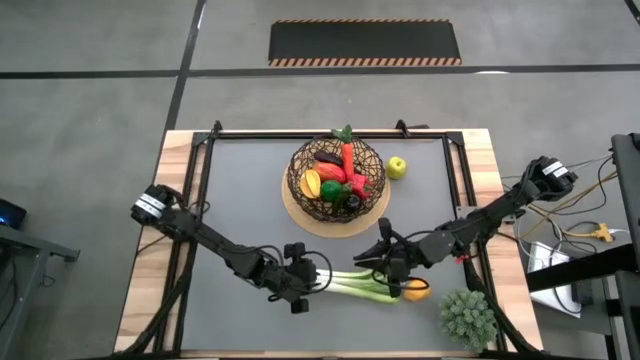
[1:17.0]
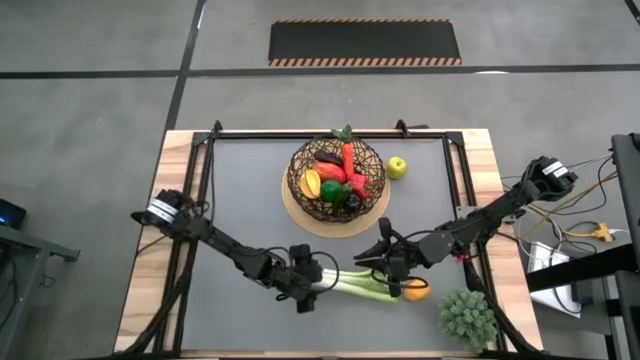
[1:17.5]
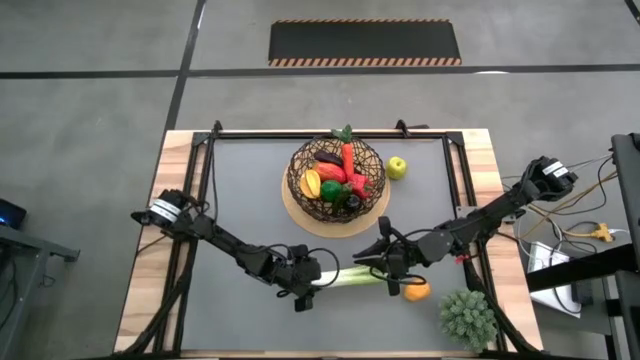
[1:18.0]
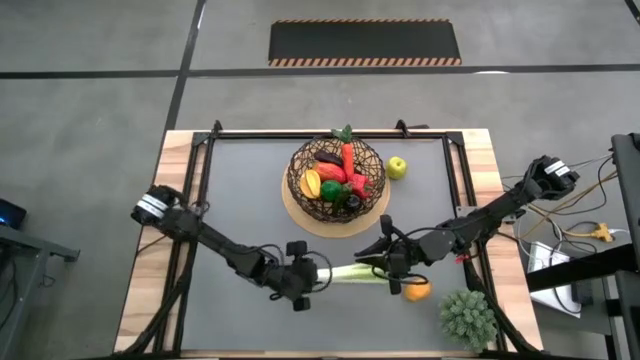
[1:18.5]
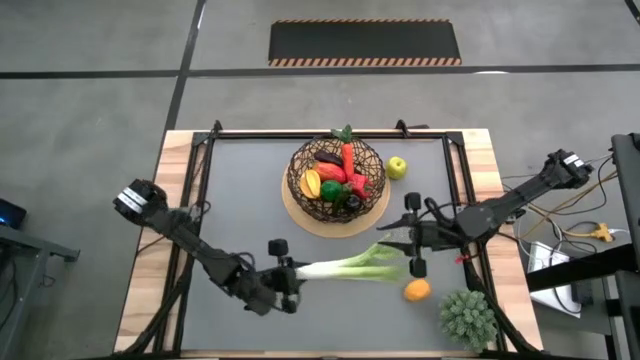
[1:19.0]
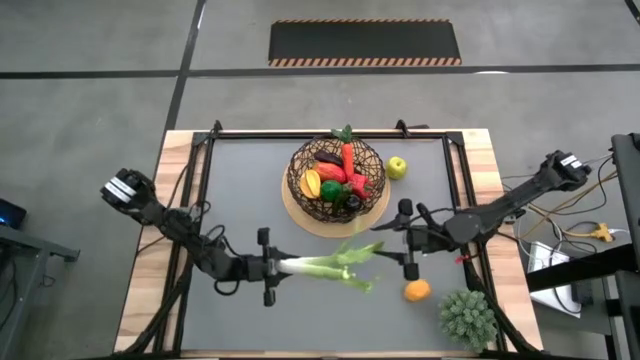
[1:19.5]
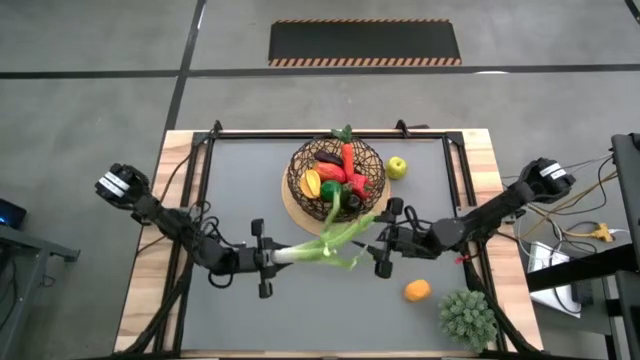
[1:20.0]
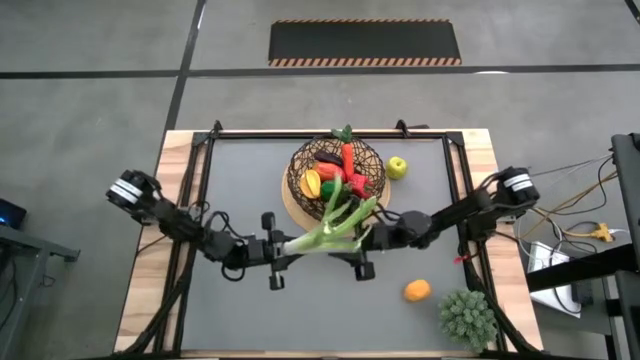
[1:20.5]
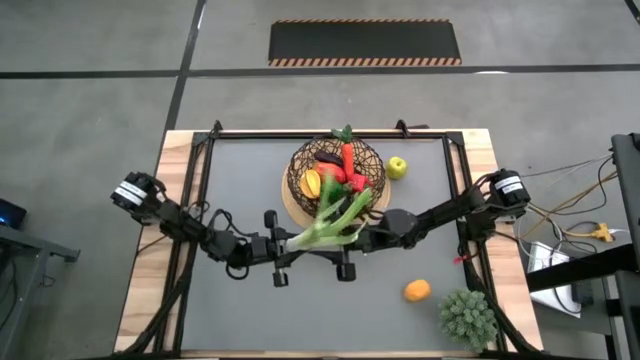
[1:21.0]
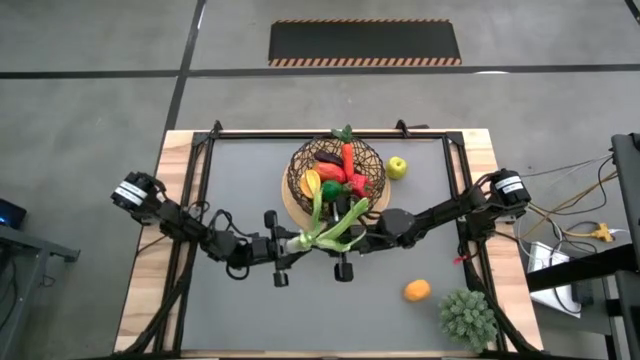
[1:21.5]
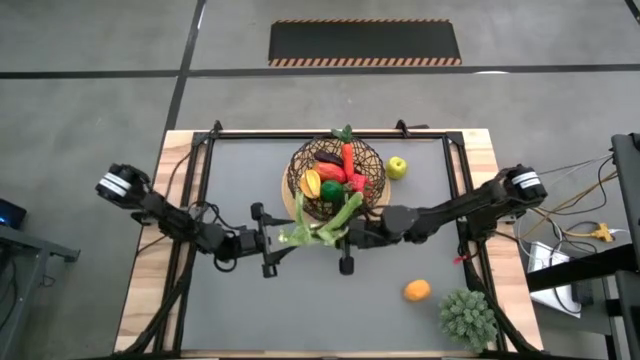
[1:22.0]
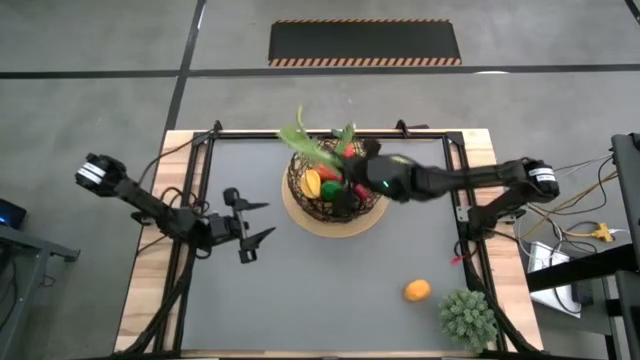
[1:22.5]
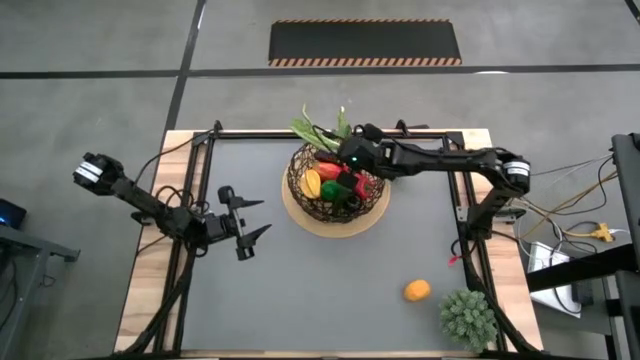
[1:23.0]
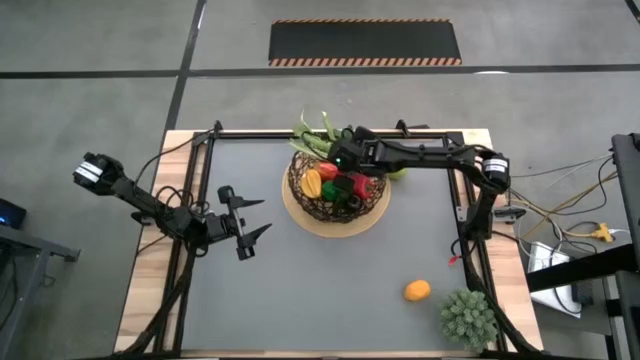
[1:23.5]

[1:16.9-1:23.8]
Task: Build produce basket
Put the celery into the basket

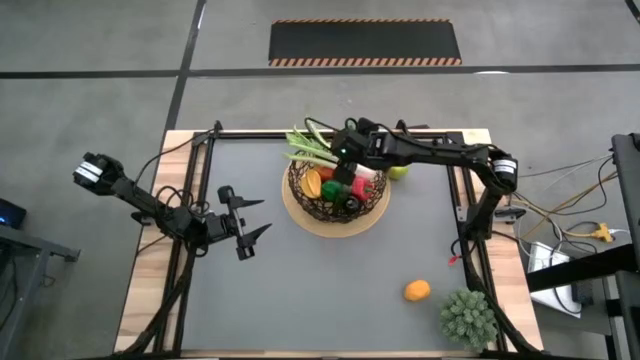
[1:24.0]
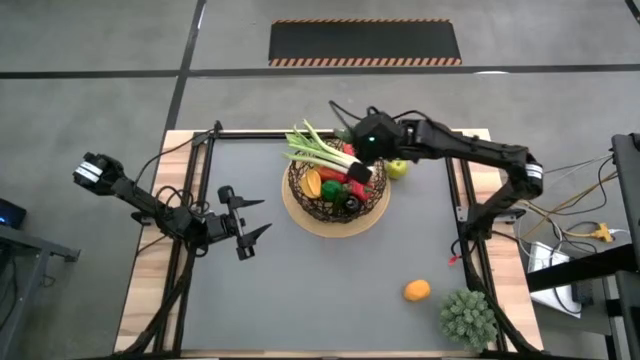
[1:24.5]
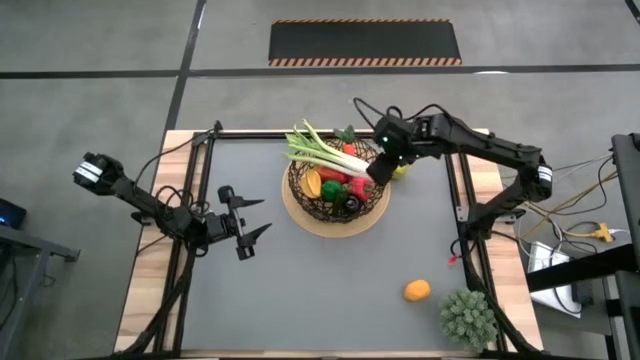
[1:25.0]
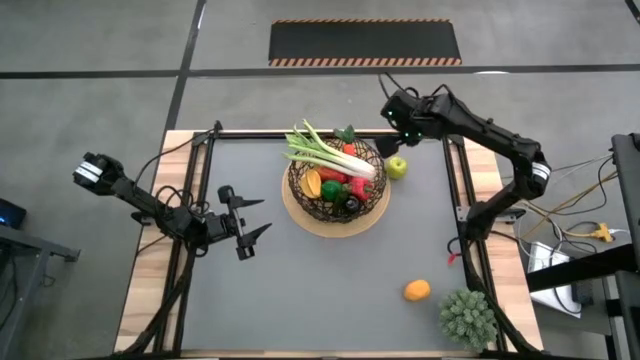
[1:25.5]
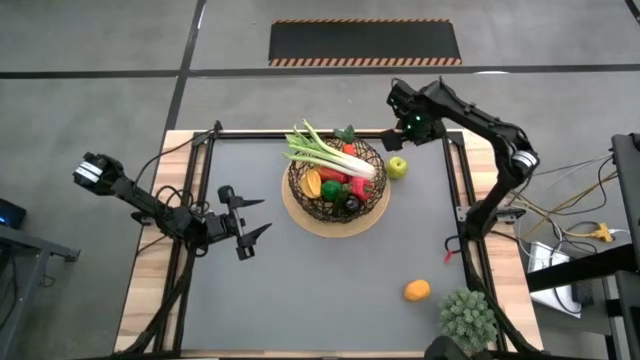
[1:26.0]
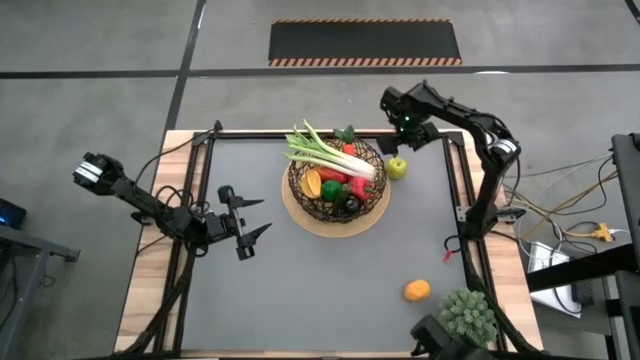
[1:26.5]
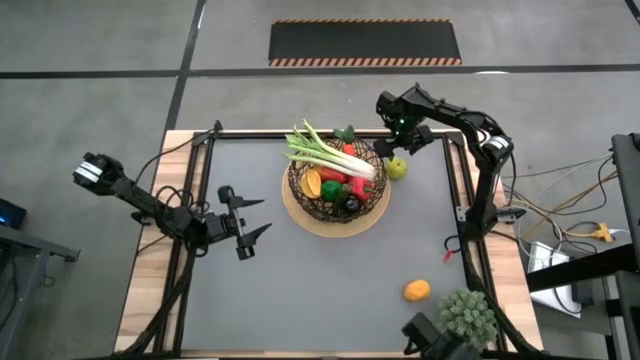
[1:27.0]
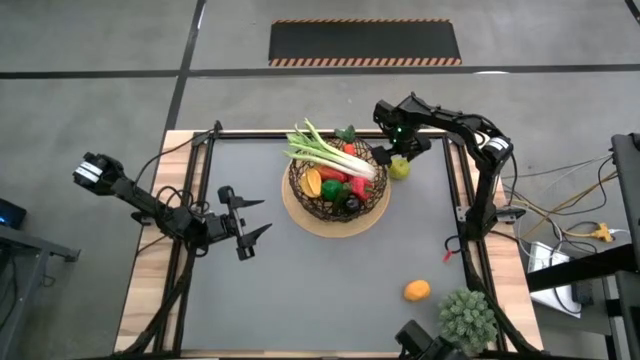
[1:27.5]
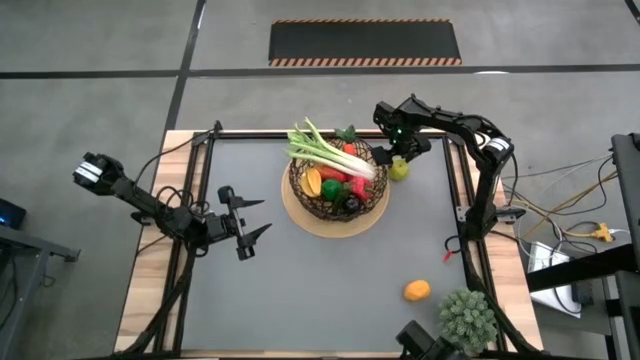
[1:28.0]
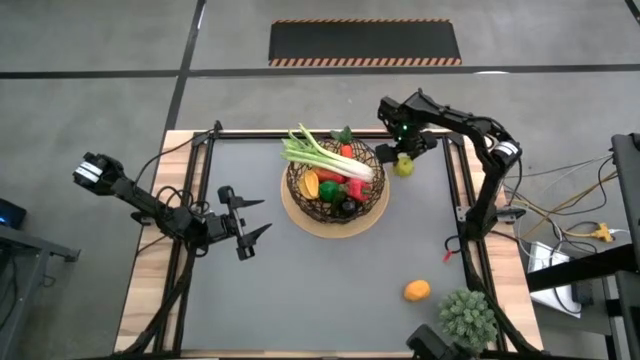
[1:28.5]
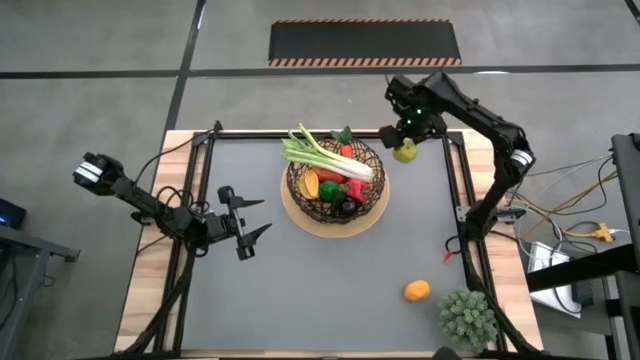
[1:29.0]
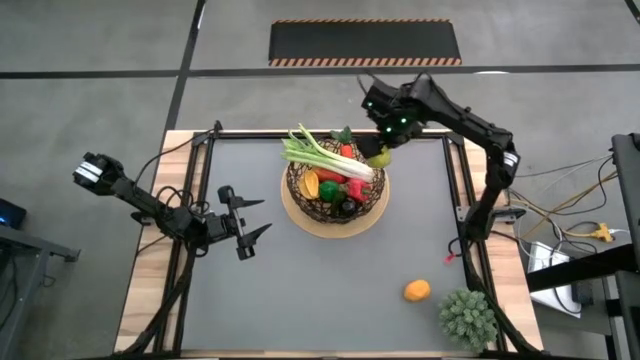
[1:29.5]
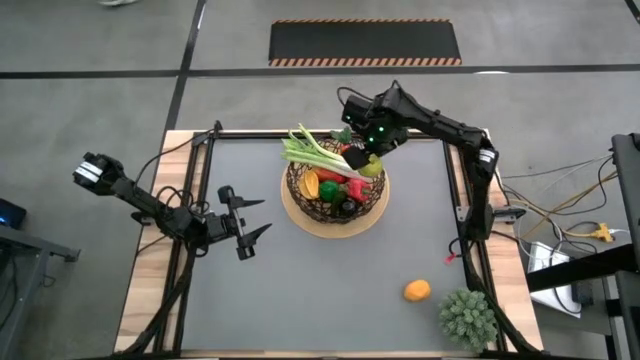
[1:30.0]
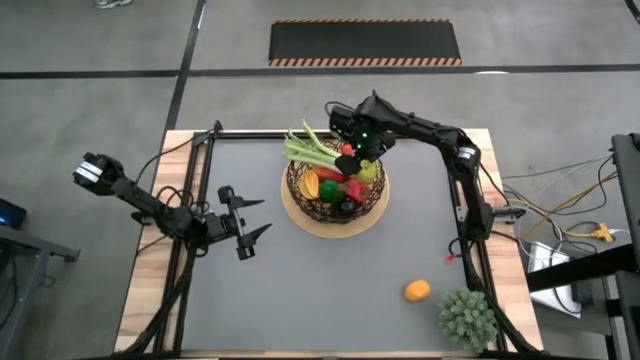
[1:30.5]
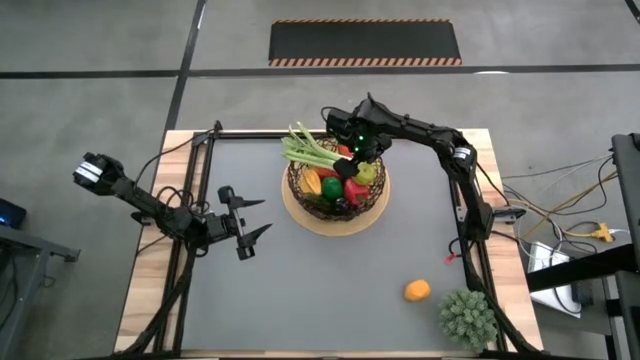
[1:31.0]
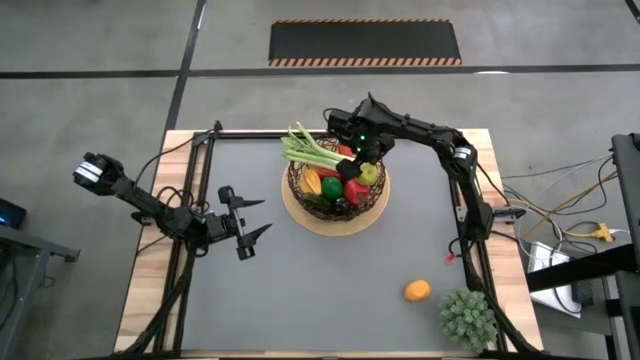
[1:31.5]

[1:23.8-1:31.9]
Put the apple into the basket

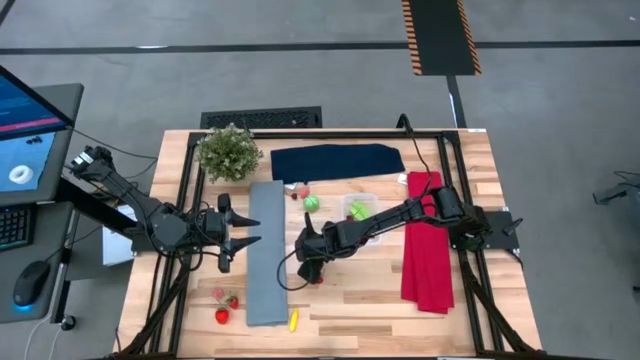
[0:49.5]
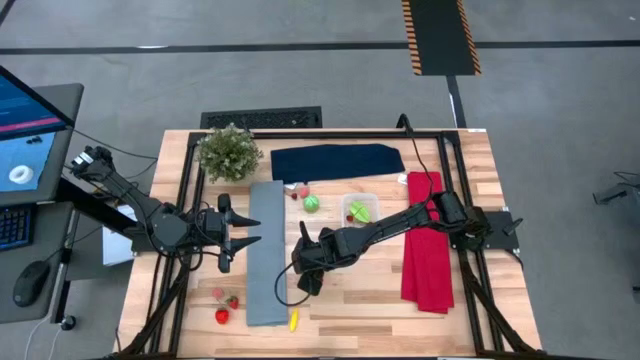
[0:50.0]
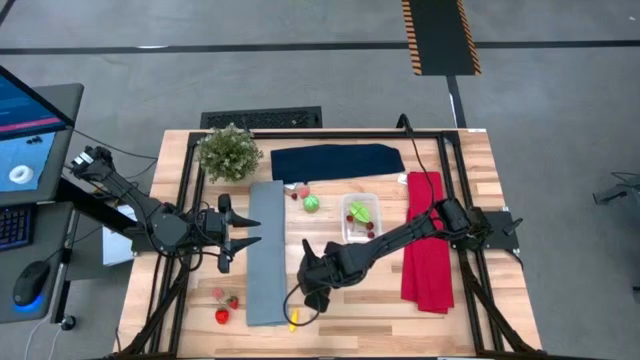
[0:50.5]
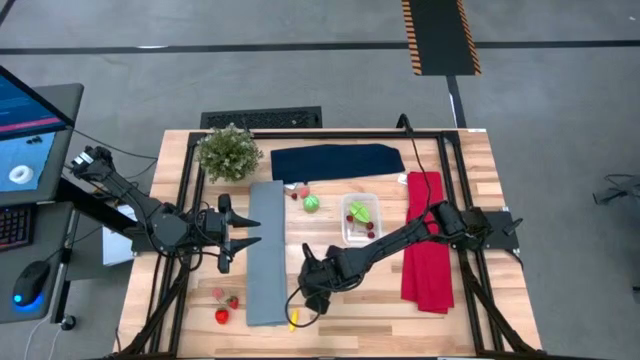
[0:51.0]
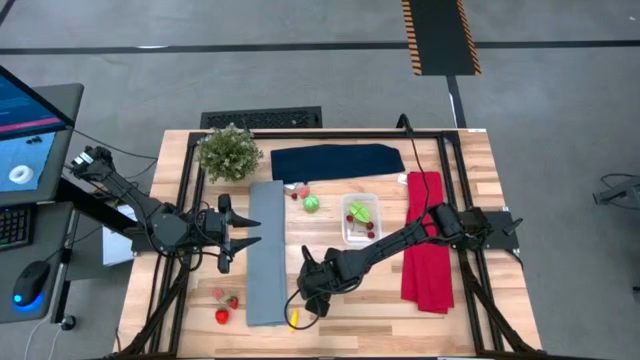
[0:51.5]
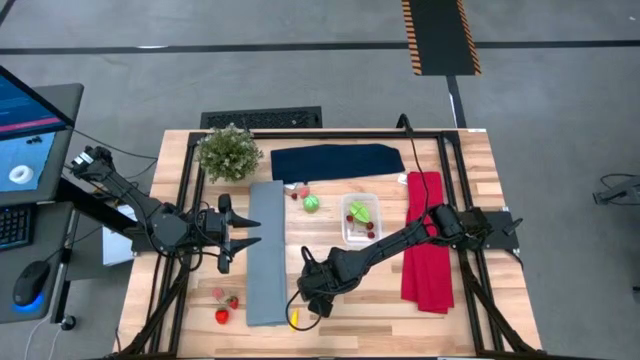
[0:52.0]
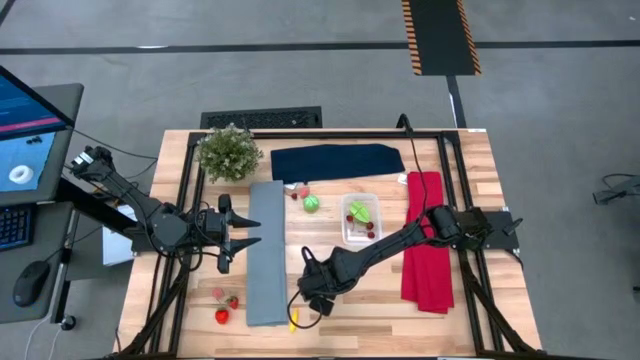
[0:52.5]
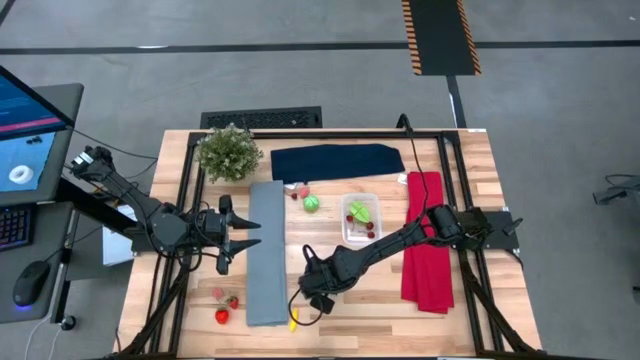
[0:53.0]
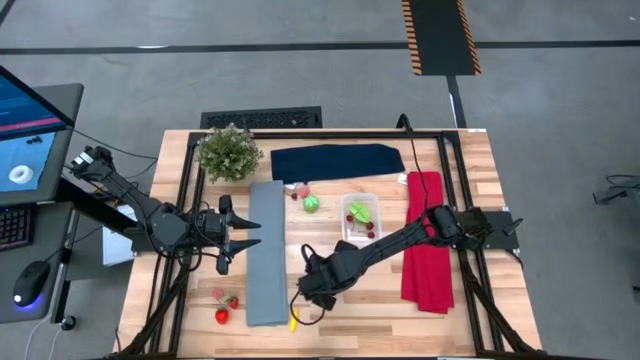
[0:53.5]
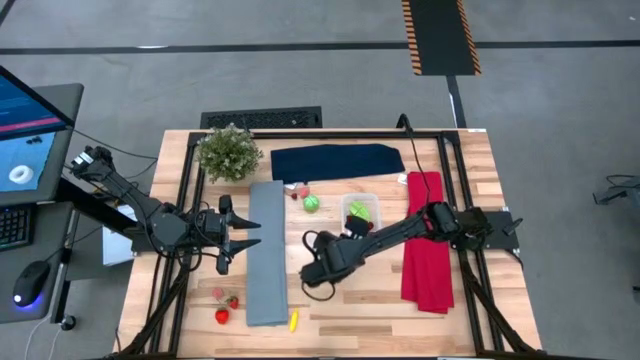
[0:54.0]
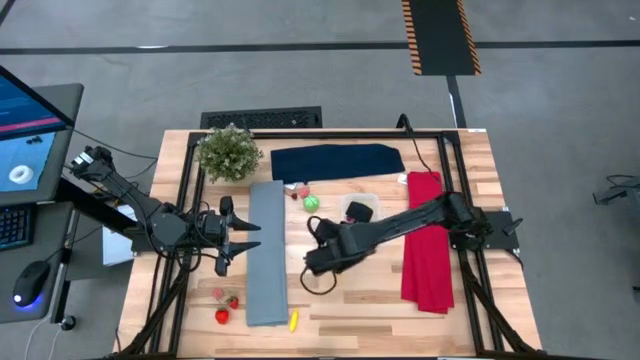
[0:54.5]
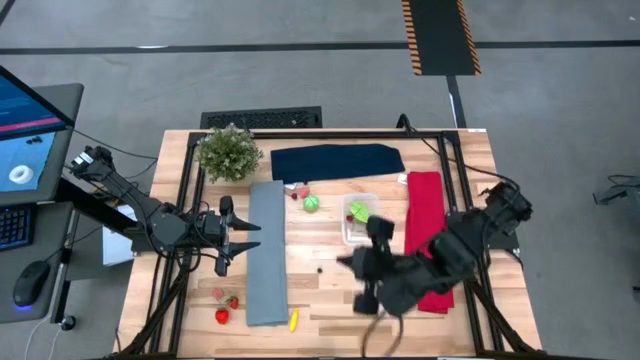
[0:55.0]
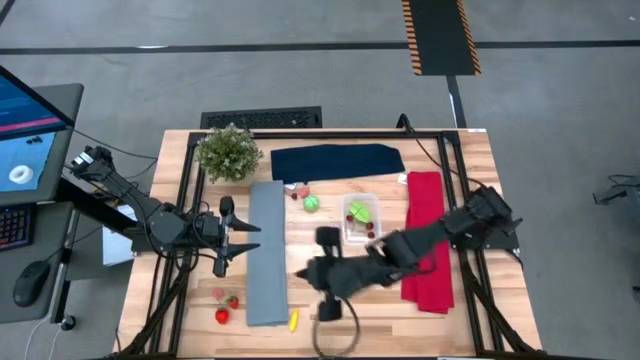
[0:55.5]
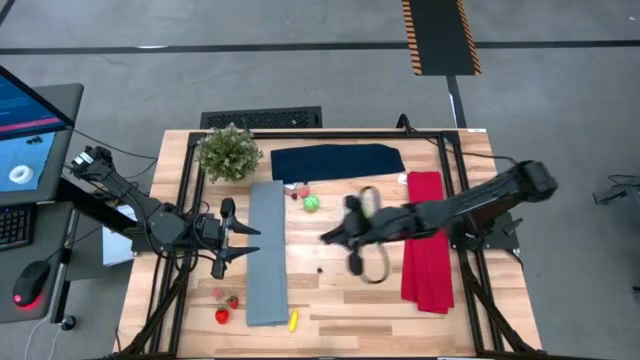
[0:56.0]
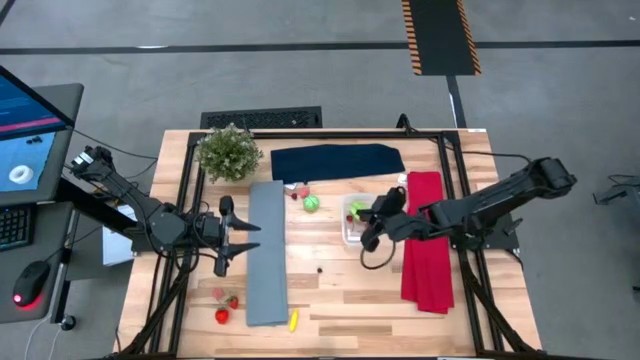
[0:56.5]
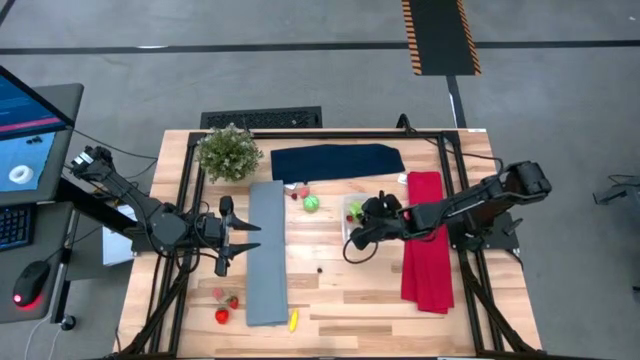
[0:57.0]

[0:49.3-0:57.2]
Task: Pick and placing Produce into tupperware
Put the red cherry into the transparent bin
